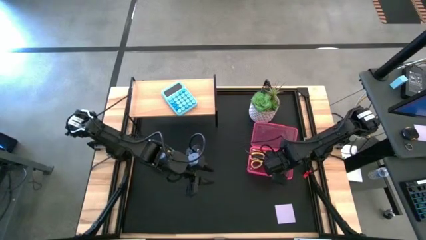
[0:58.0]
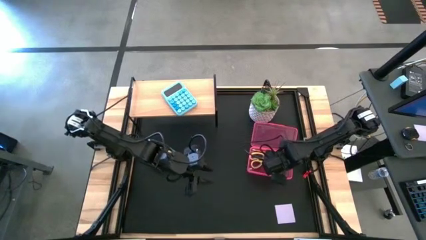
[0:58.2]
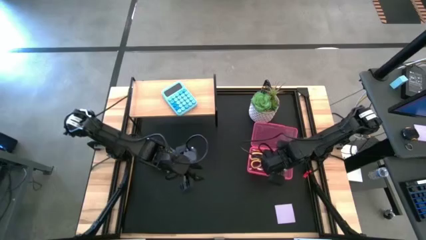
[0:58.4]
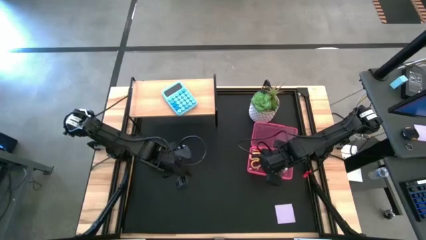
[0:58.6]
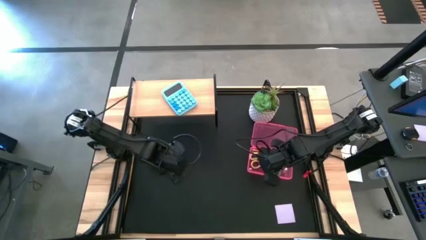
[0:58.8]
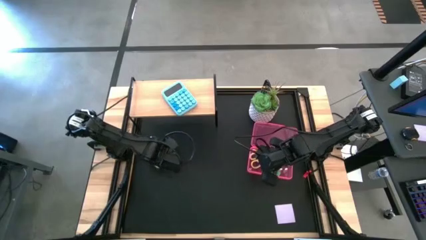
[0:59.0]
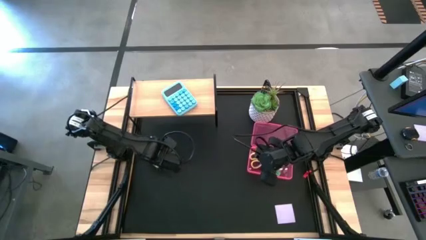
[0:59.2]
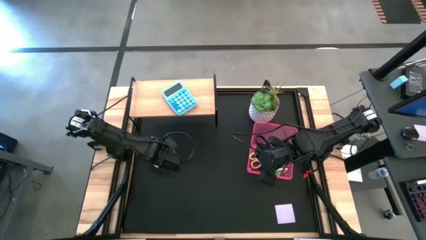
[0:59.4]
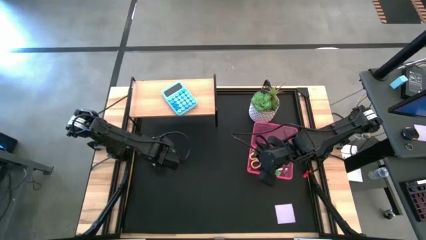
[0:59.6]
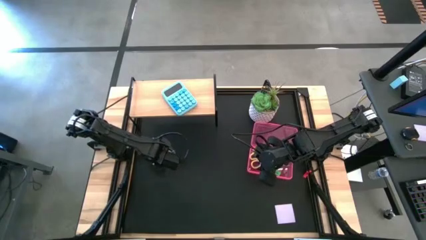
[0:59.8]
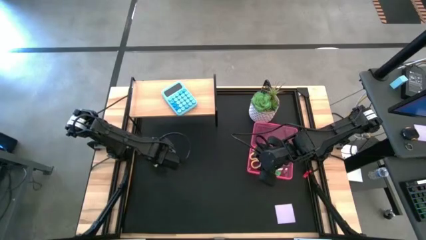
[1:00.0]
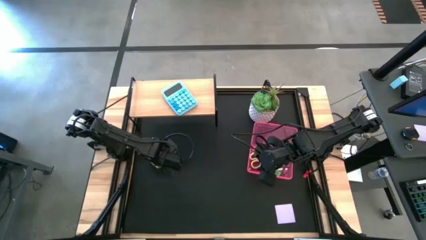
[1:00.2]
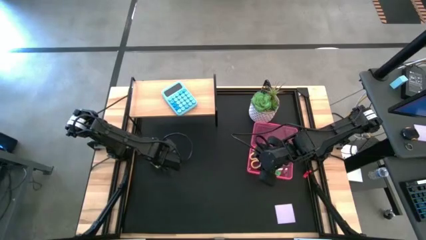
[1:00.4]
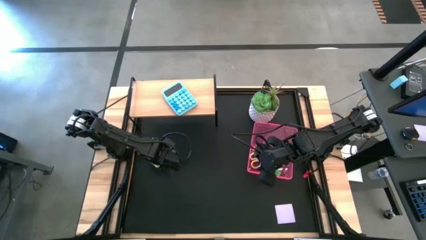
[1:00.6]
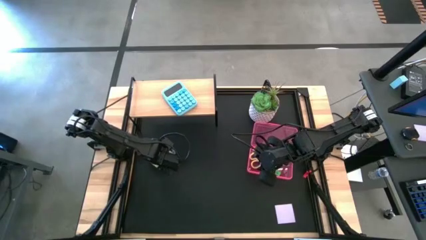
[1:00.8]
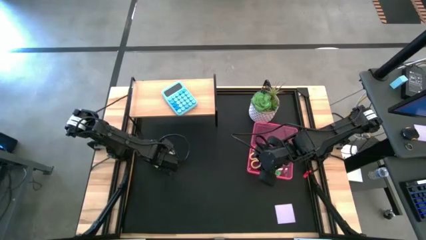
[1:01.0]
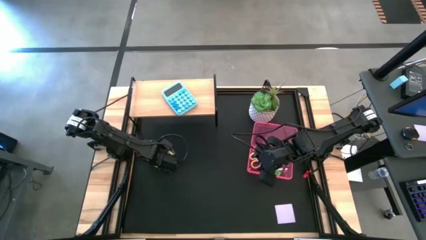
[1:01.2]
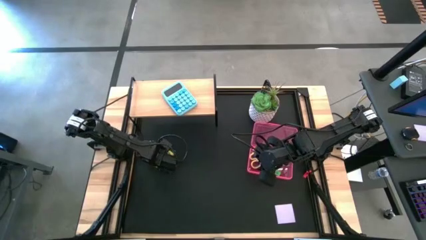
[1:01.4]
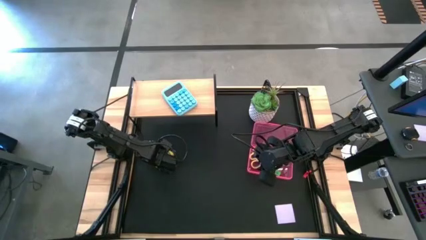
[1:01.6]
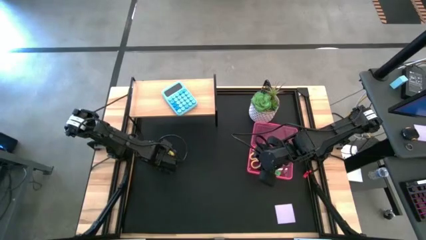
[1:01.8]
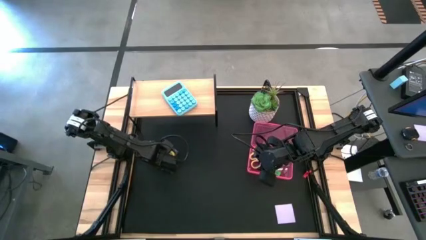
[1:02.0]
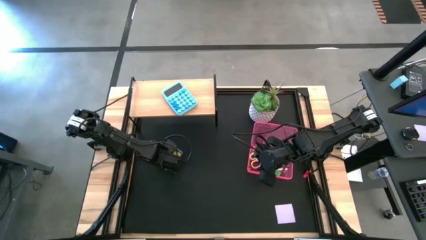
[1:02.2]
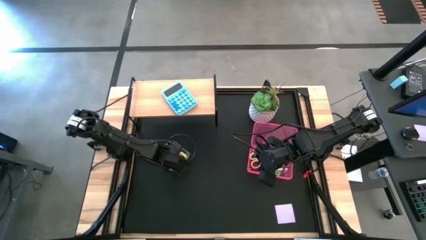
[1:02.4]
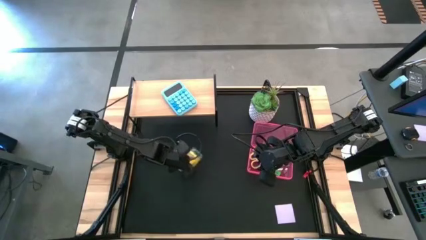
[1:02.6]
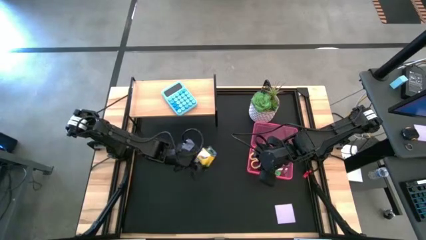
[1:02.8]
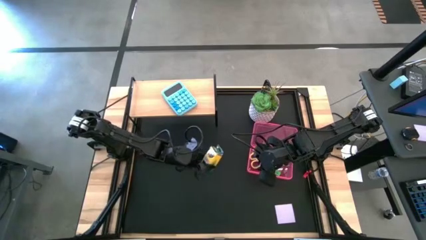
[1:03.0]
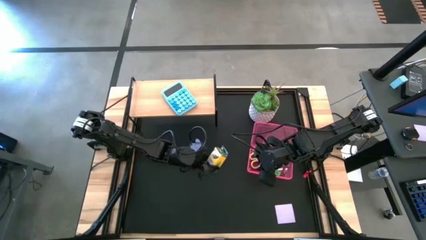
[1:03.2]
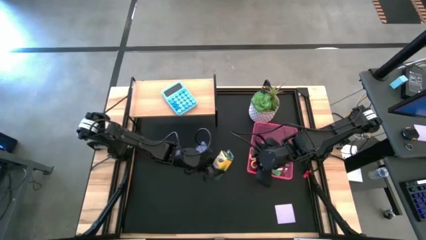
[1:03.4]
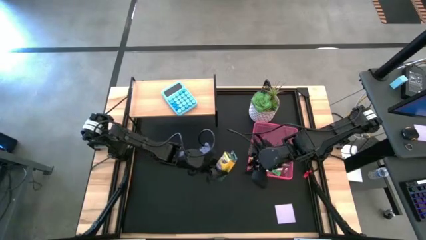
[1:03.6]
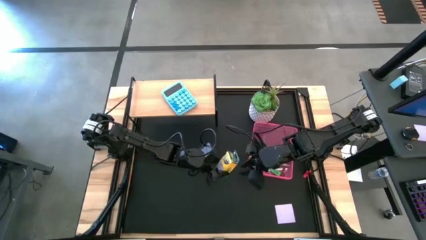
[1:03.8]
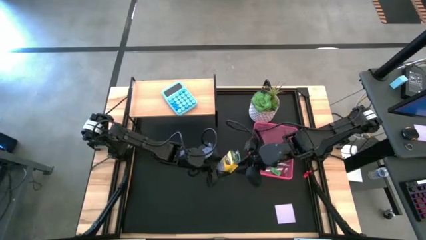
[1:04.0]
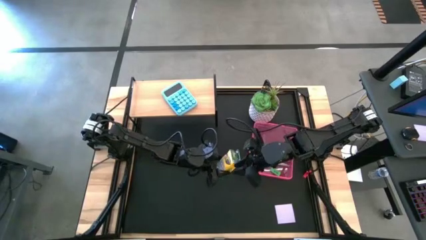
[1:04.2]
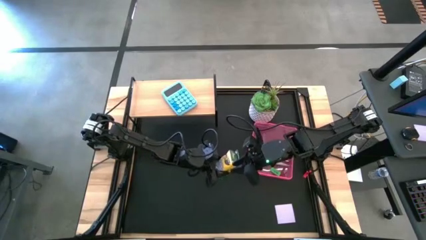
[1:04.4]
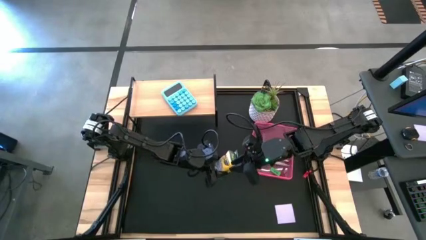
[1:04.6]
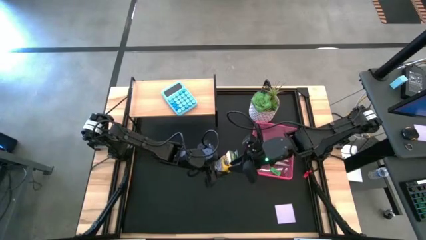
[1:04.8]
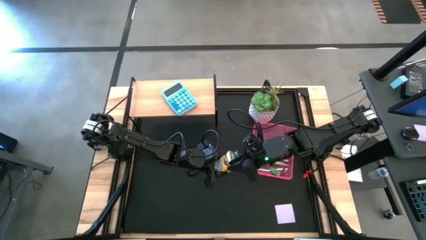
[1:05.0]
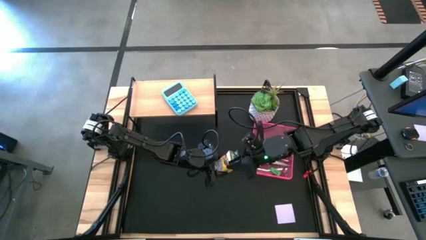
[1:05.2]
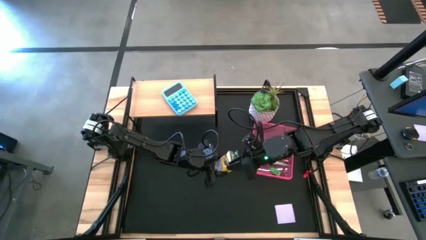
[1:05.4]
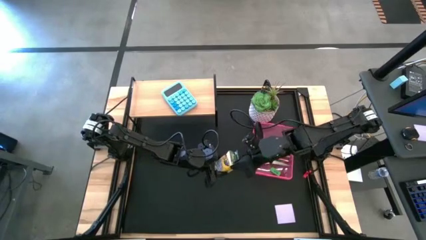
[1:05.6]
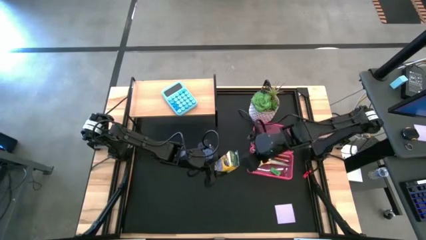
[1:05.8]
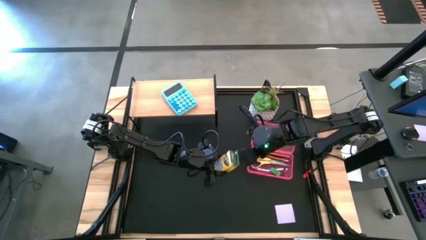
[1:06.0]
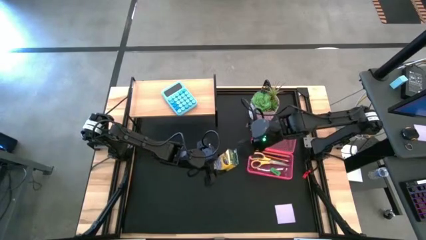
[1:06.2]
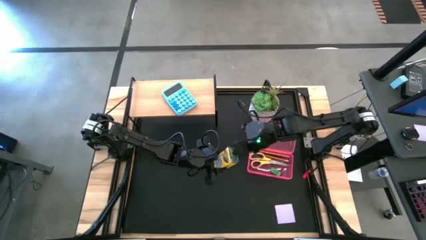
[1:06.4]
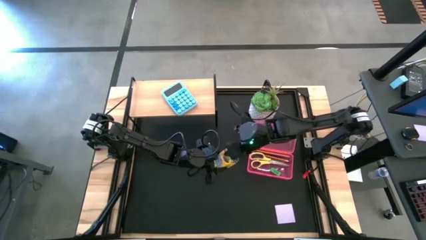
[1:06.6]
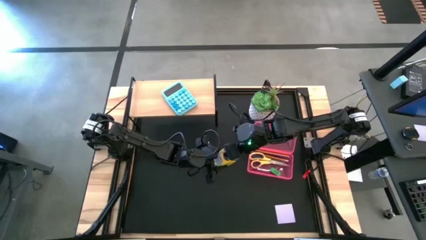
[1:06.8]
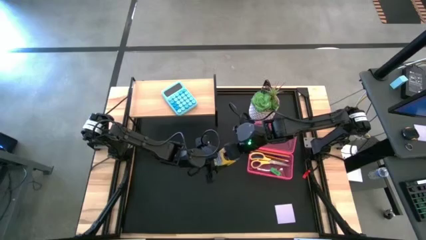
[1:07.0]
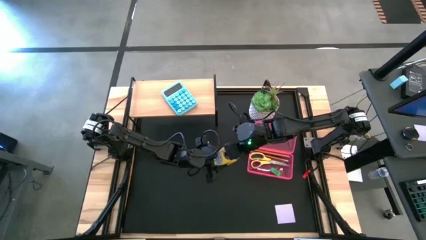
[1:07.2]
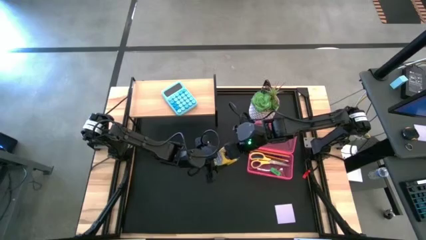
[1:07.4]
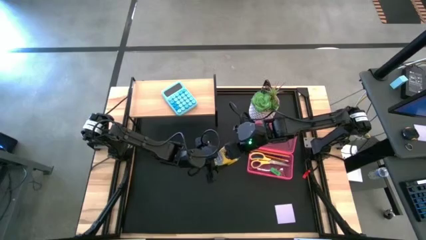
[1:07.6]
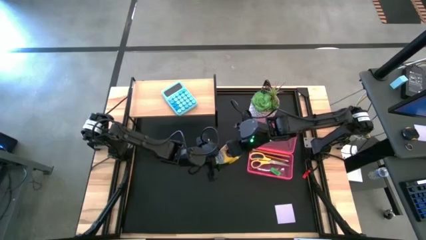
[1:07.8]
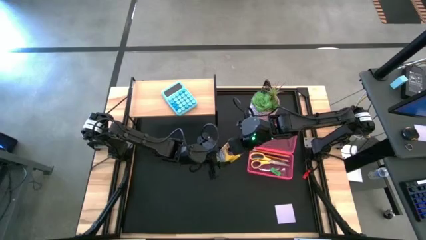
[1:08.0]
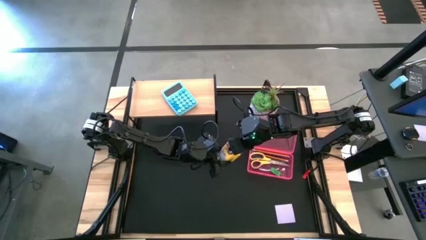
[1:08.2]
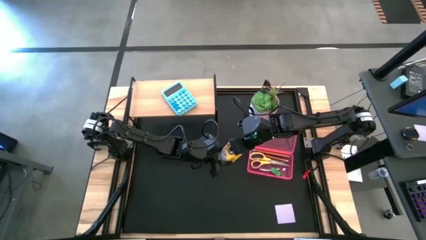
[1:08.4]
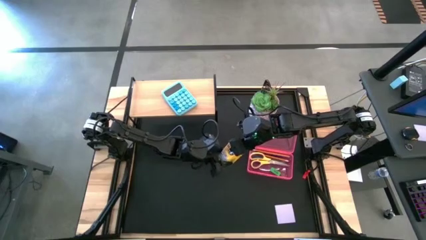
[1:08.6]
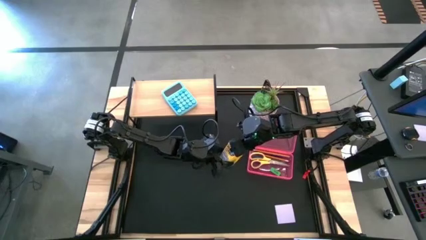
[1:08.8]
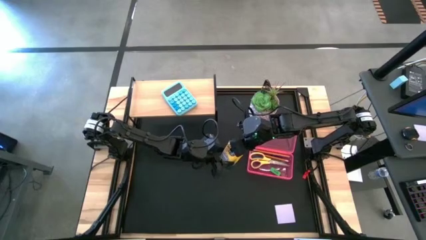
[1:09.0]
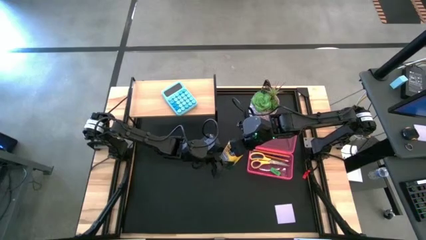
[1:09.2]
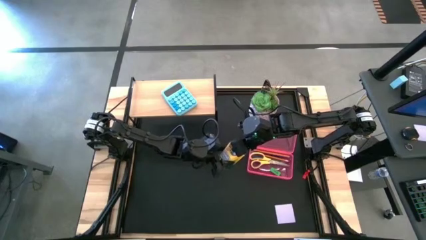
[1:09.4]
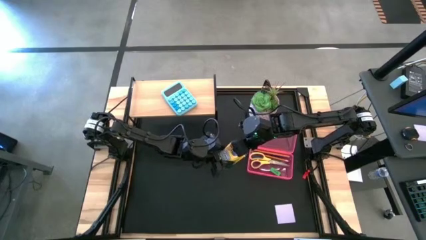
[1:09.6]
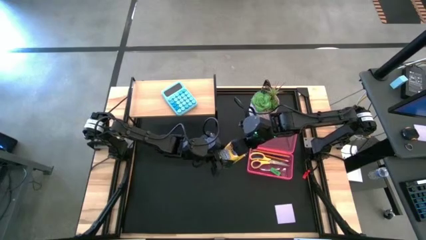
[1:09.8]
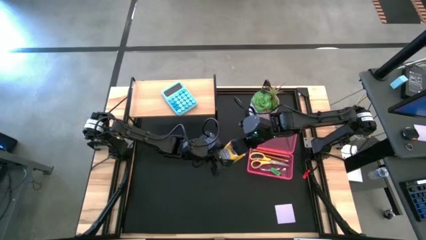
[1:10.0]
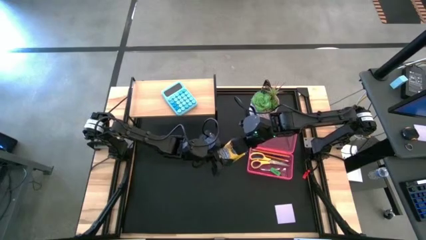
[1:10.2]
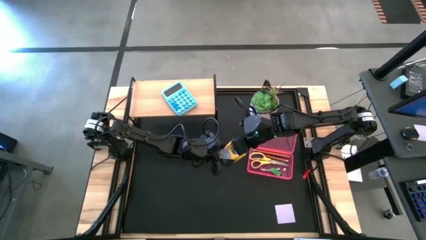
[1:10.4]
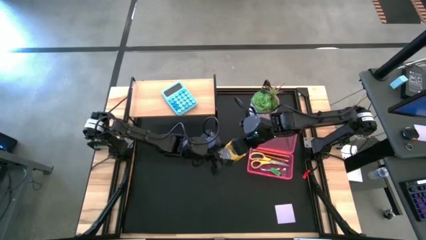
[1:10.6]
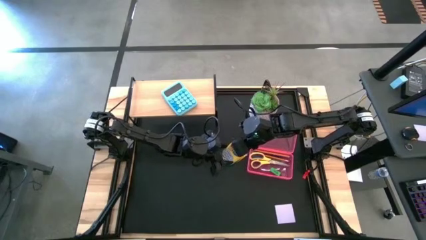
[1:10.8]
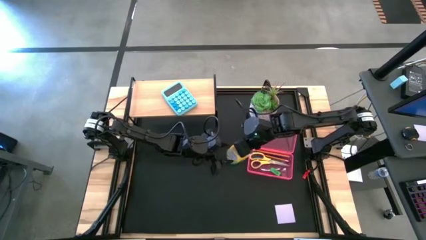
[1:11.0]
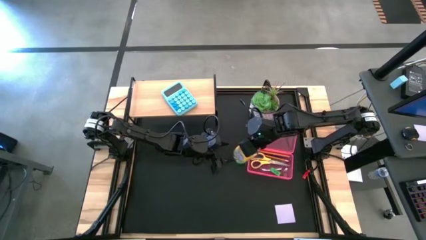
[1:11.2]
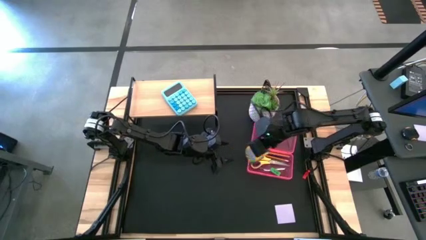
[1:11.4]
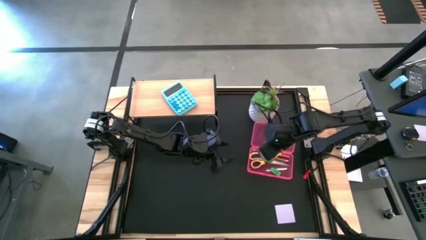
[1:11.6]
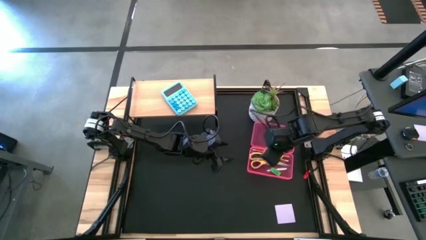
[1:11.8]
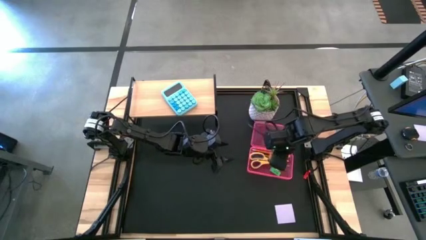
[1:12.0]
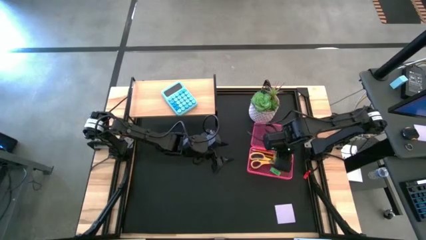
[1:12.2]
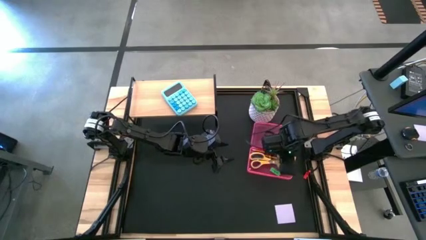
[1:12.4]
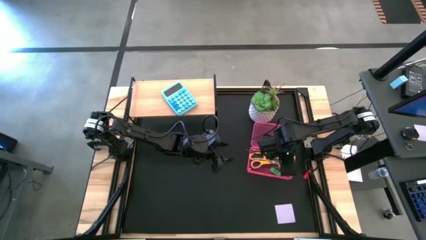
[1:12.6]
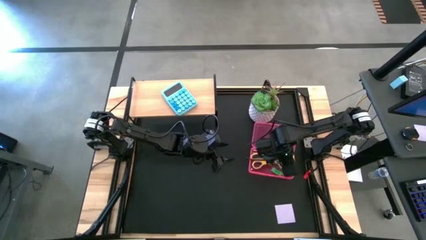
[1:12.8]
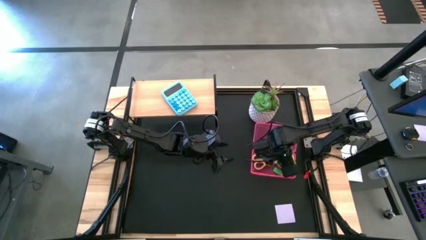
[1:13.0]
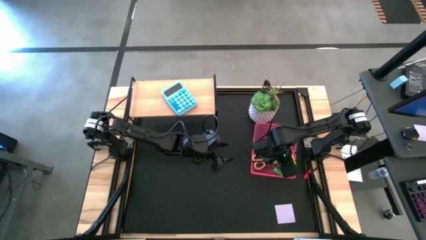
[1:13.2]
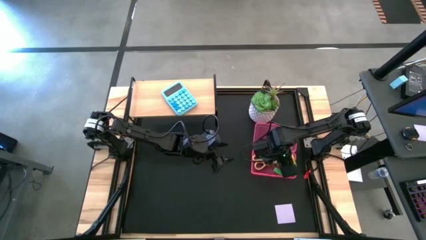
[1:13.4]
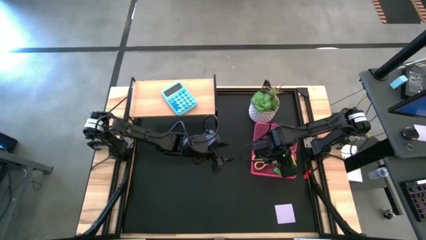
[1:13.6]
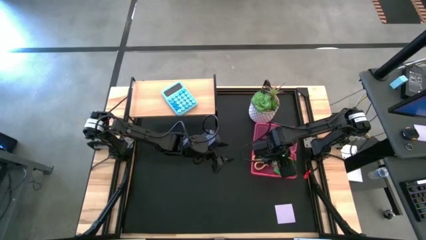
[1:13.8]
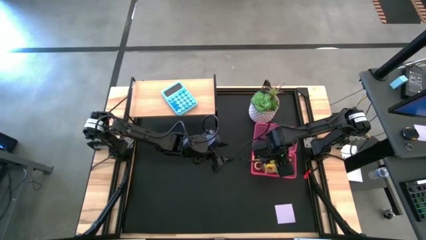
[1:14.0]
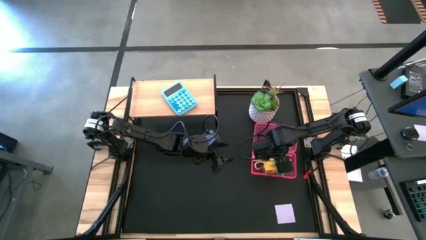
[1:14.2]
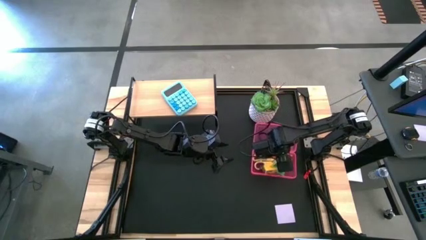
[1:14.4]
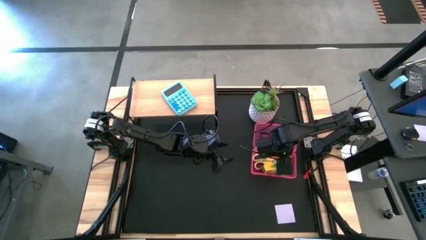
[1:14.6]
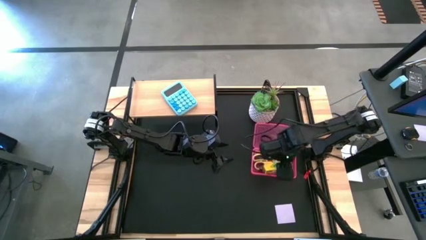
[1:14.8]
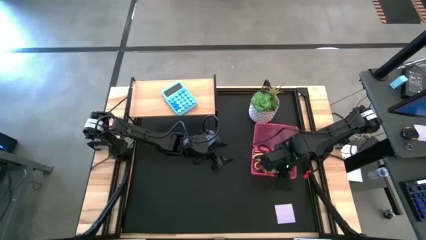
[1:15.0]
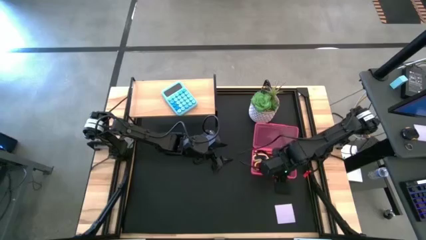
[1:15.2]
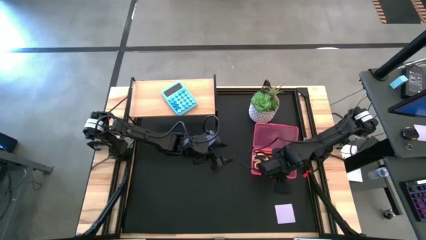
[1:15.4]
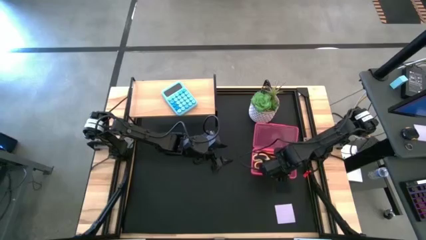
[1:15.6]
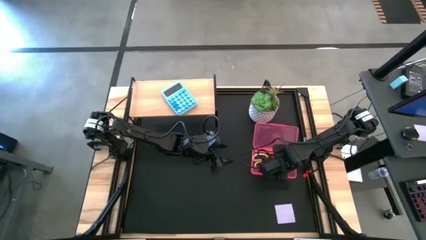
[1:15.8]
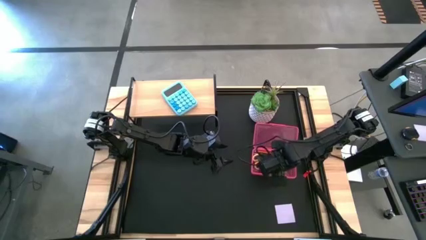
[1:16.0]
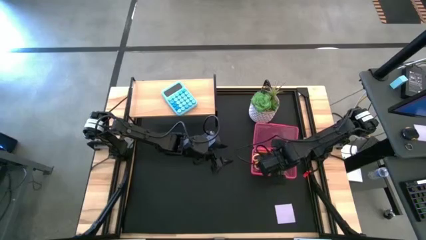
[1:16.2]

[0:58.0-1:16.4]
Task: Pack school essentials
Put the yellow crayon box into the pink supply box
